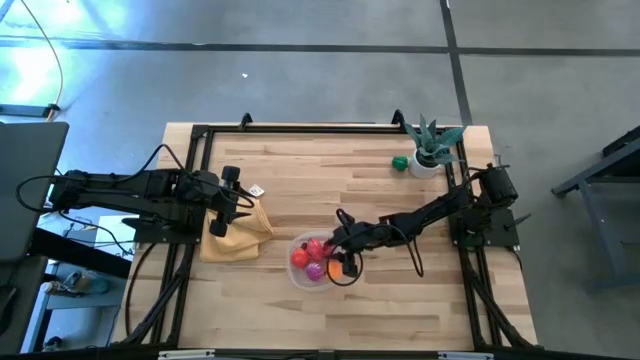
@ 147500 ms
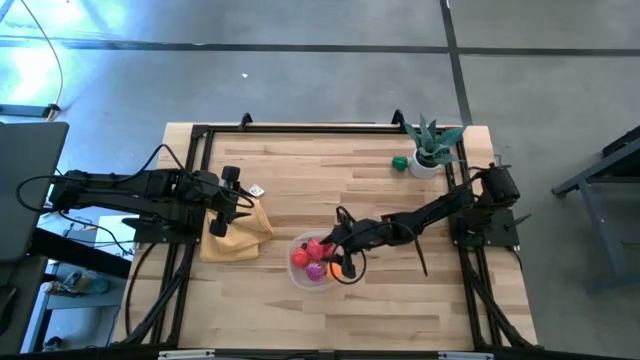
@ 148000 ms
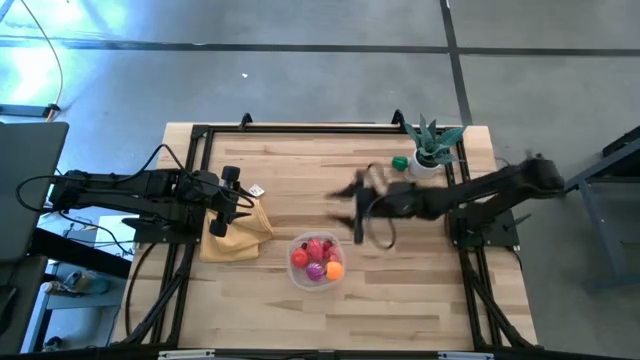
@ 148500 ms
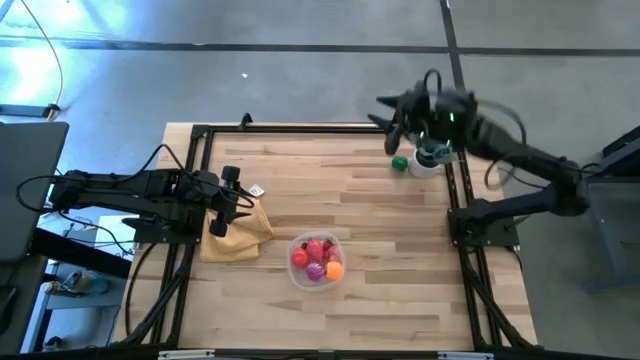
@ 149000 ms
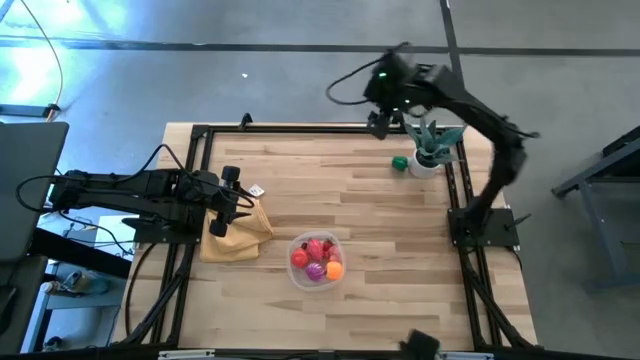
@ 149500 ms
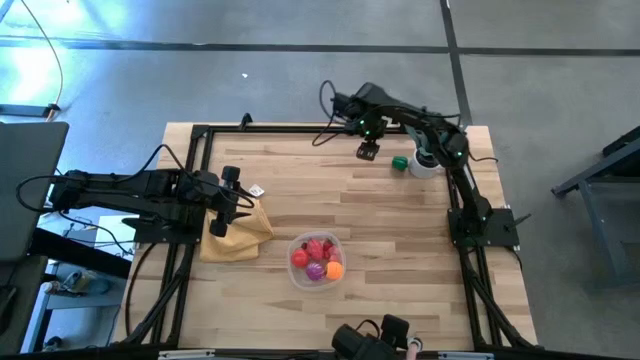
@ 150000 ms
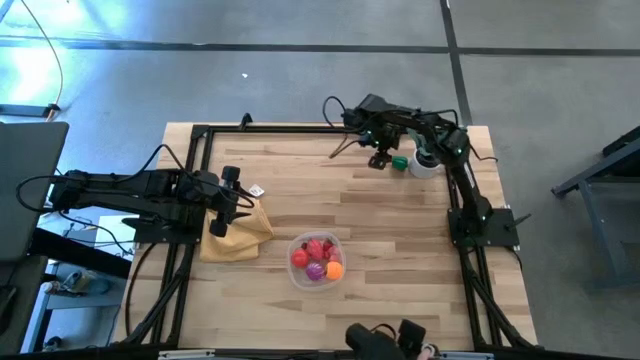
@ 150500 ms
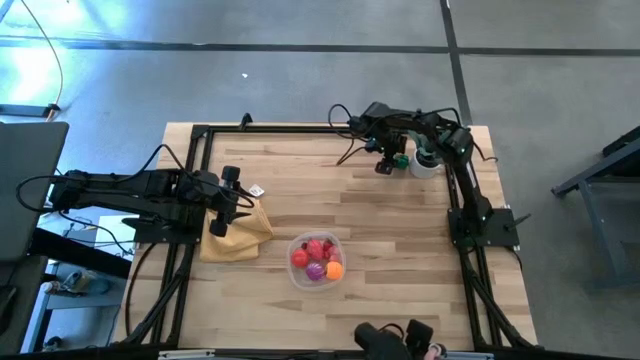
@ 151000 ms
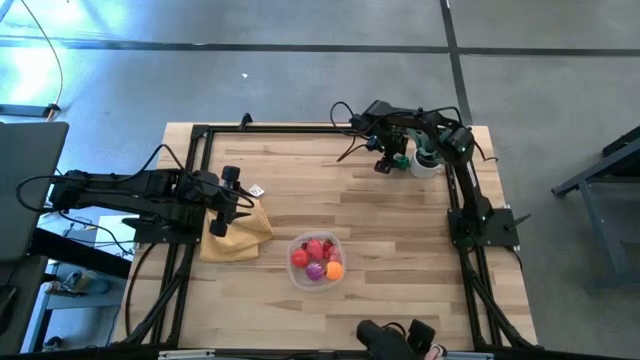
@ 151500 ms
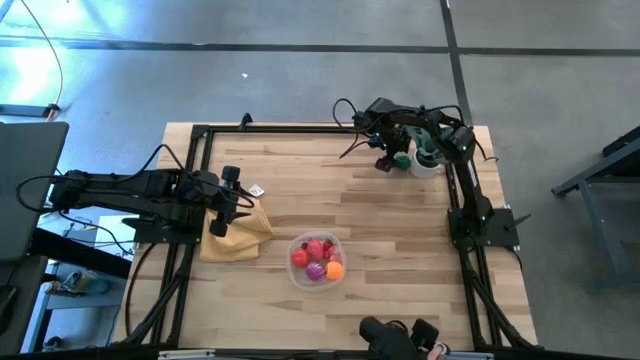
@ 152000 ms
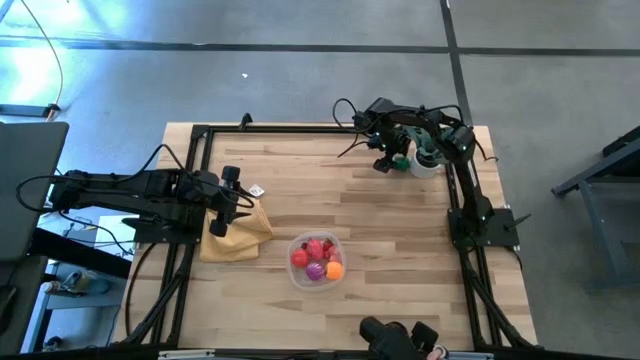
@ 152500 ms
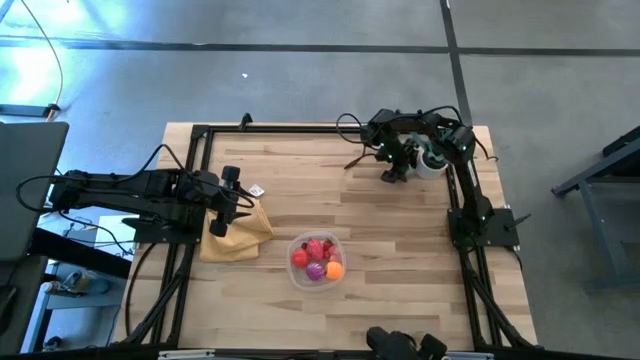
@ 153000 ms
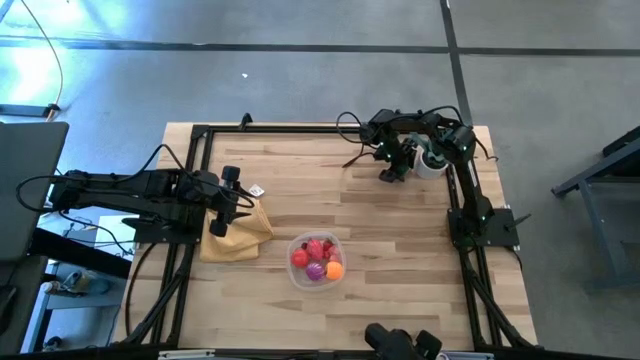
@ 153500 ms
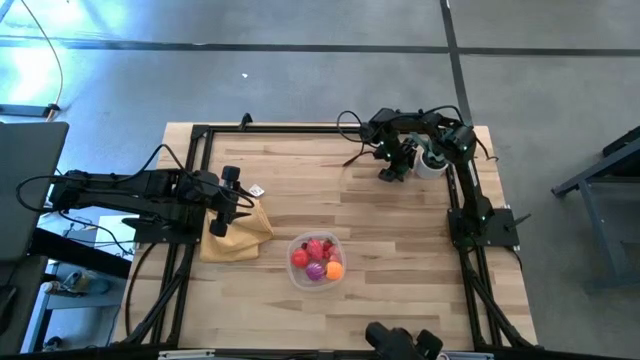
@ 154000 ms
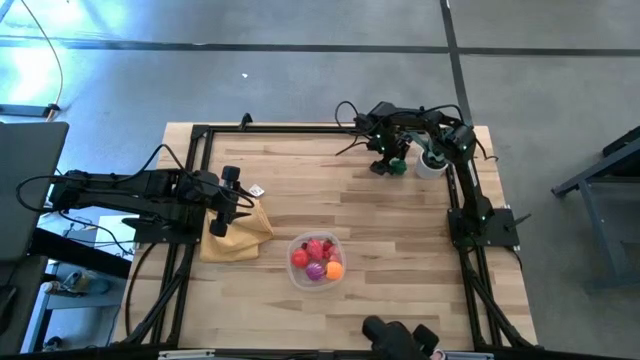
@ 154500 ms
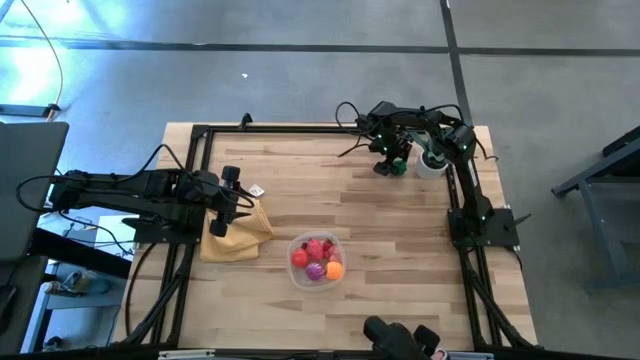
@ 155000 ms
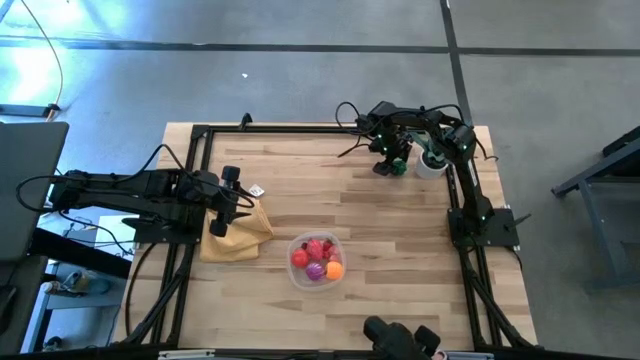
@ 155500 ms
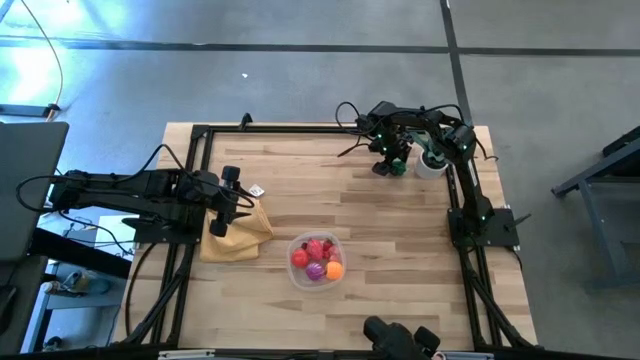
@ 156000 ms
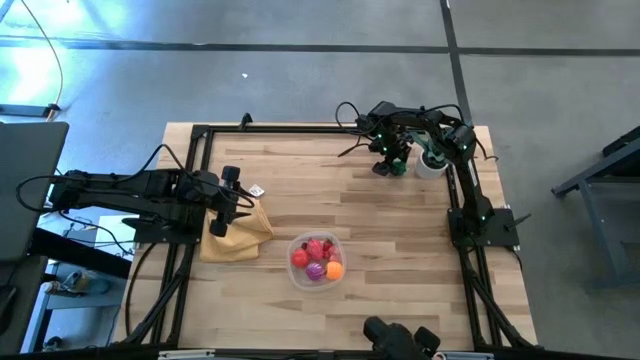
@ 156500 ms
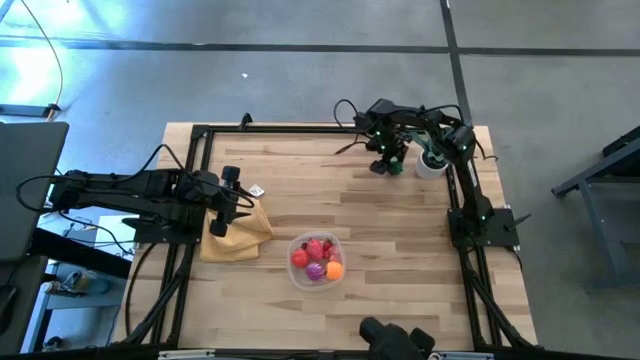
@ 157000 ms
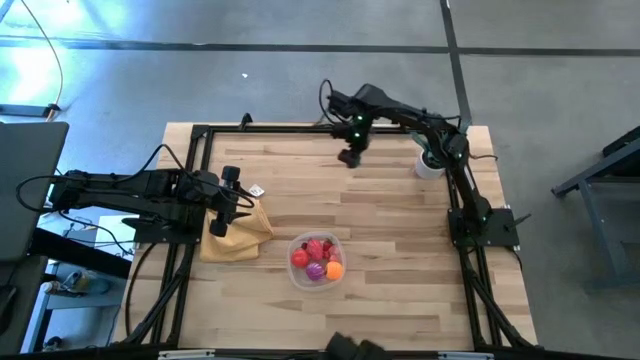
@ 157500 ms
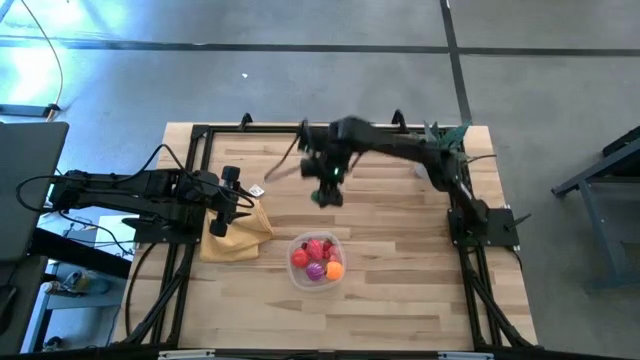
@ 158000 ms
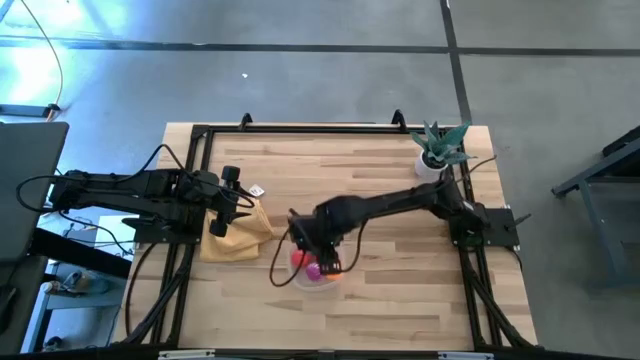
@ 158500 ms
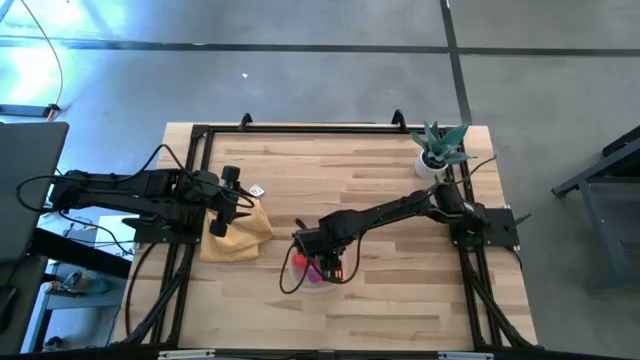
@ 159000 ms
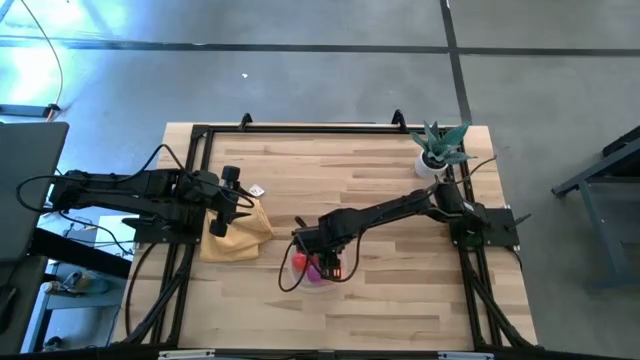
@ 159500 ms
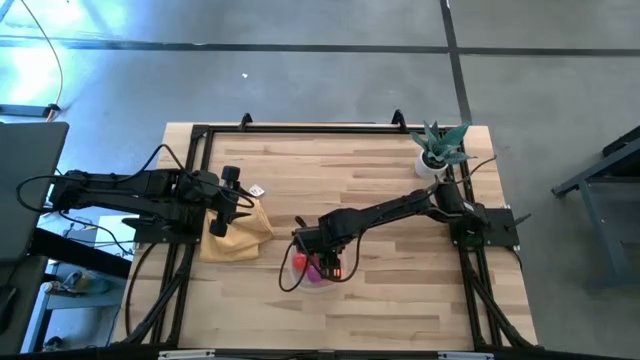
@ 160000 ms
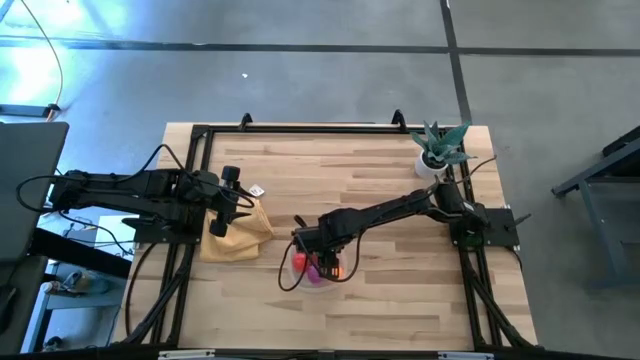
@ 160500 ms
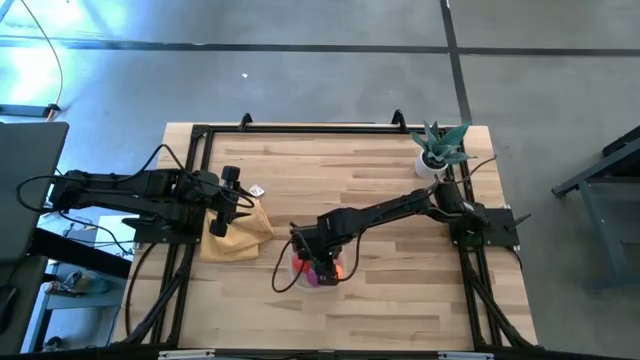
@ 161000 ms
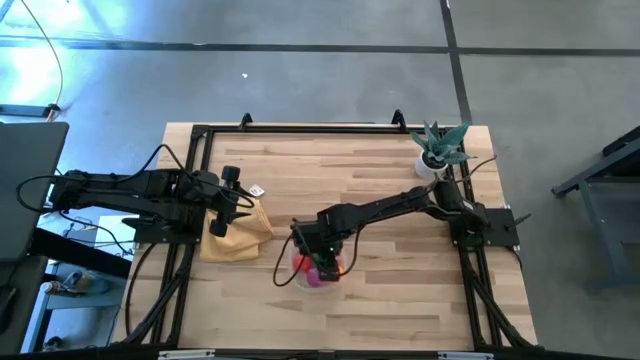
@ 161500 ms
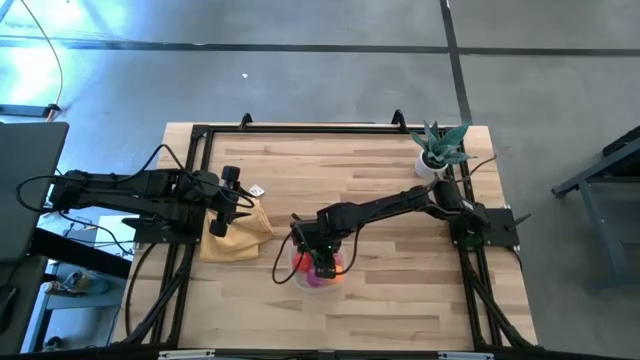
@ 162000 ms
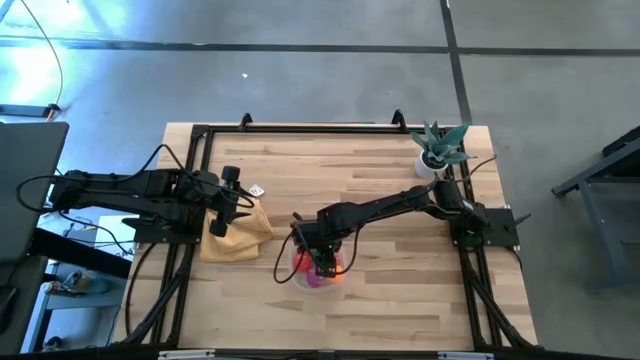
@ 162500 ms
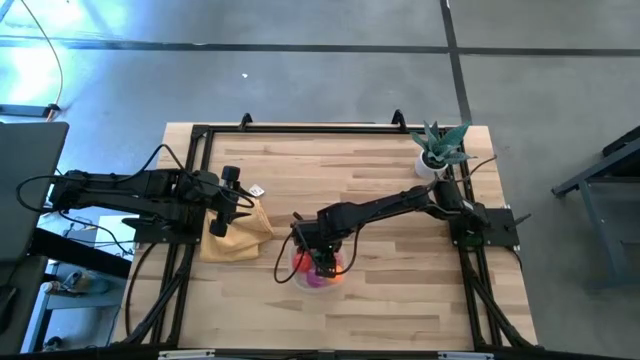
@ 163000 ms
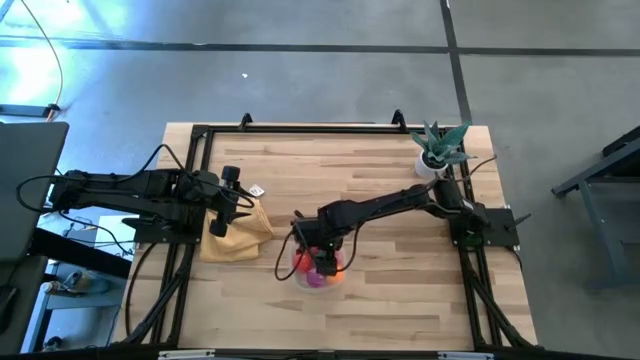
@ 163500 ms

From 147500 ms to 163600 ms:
Task: Pick and placing Produce into tupperware
Put the green bell pepper into the transparent bin

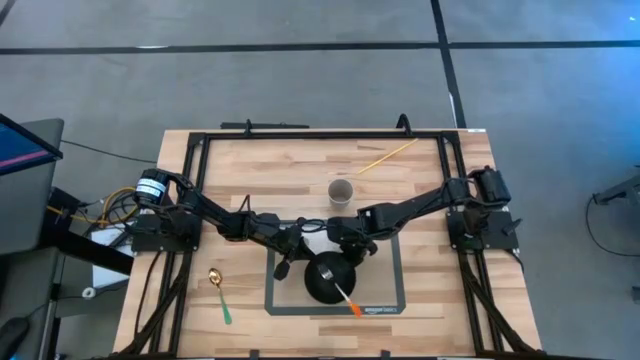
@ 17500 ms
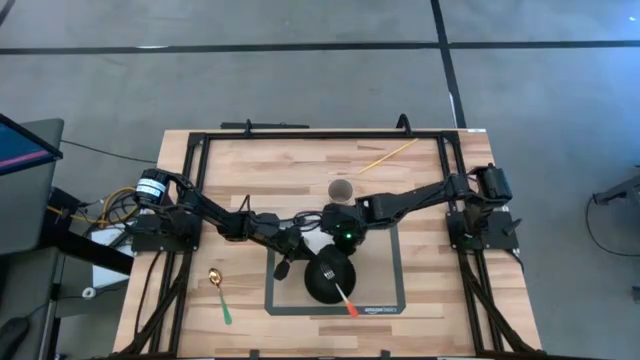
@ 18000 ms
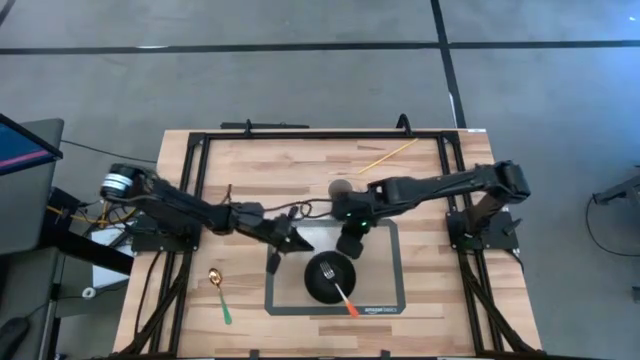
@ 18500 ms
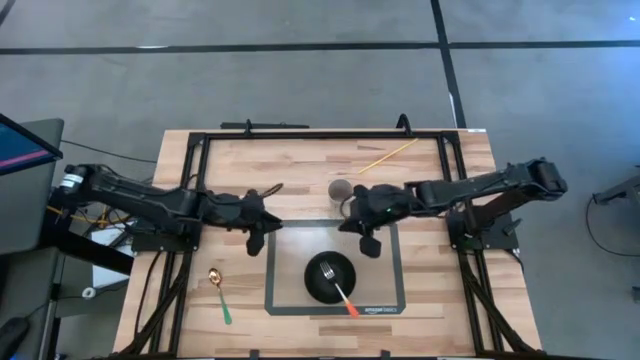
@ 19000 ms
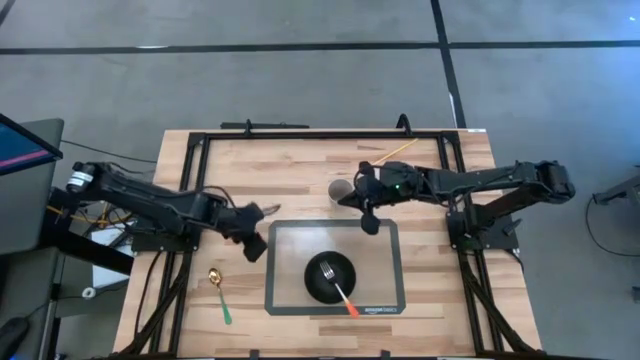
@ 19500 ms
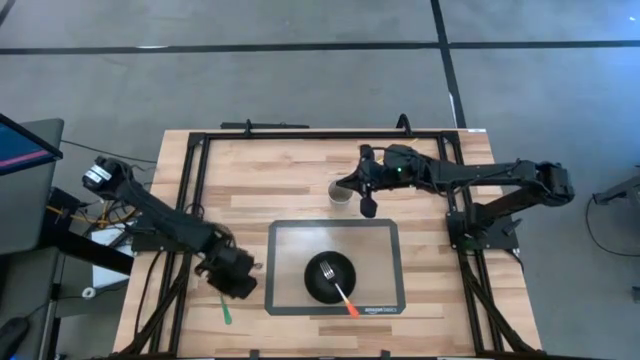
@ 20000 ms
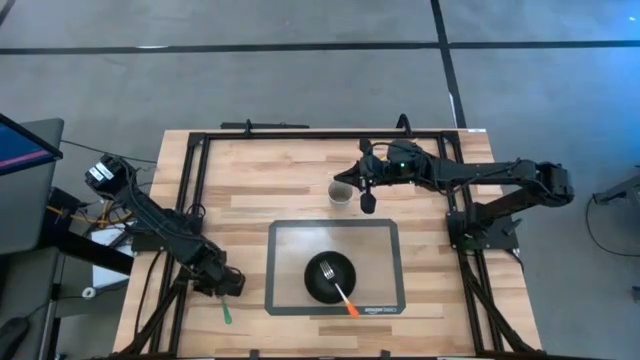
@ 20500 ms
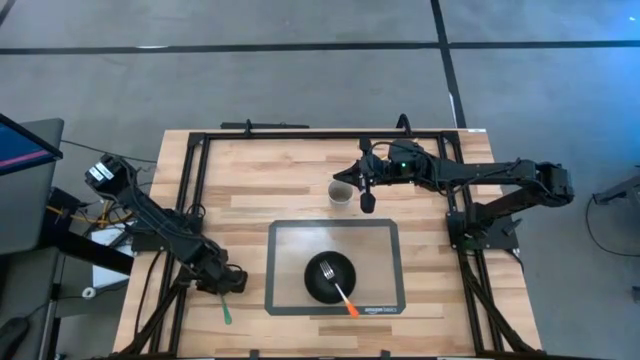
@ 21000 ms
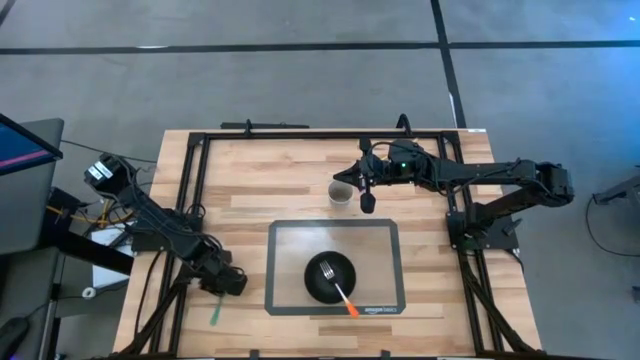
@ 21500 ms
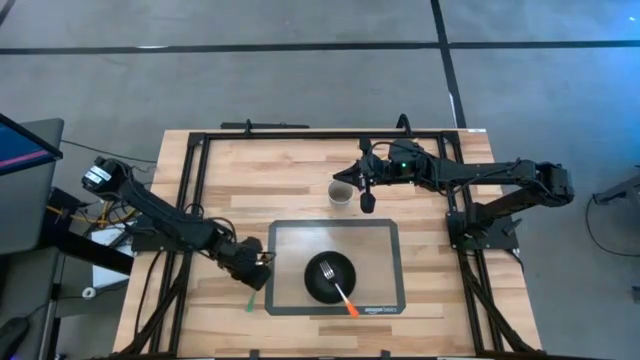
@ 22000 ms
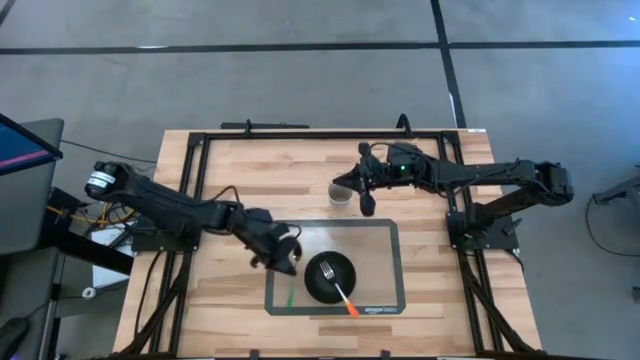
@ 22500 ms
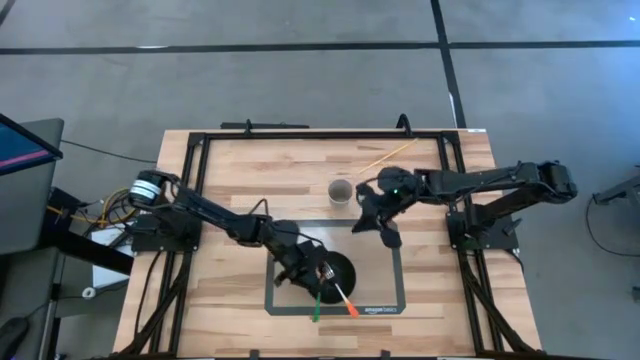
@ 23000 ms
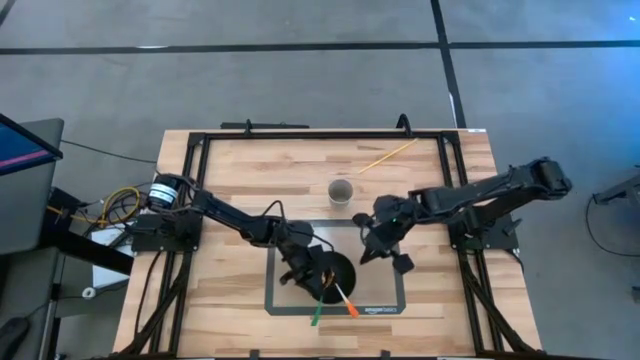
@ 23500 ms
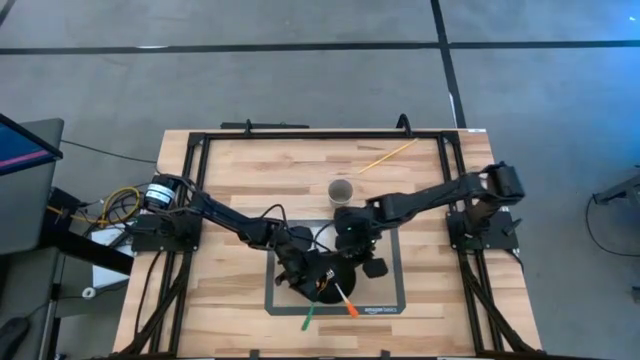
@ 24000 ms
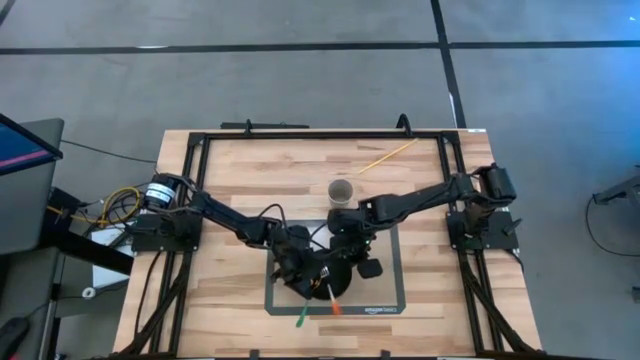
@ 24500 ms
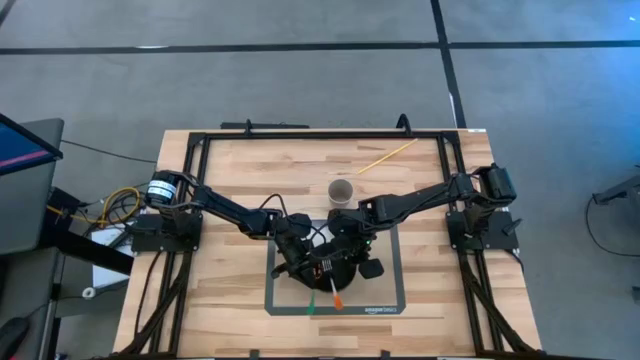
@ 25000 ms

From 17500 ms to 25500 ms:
Task: Pick & Place Utensil
Put the green spoon into the black bowl on the transparent mat
